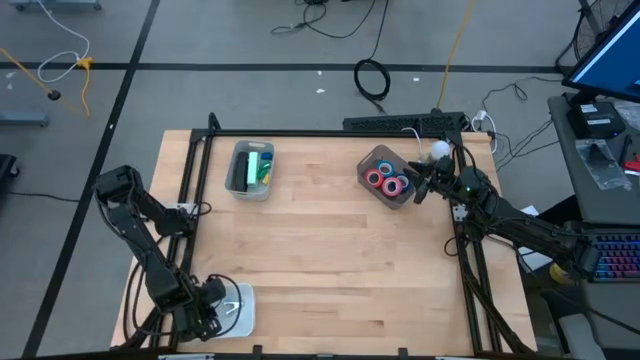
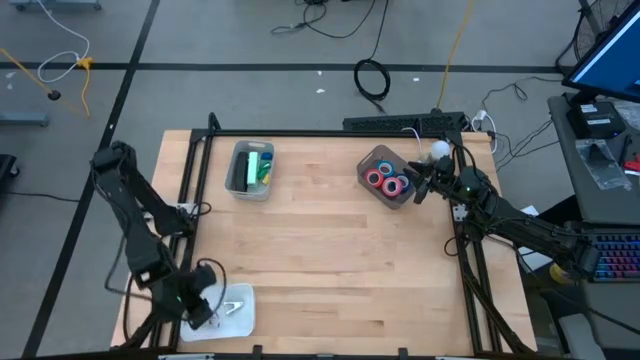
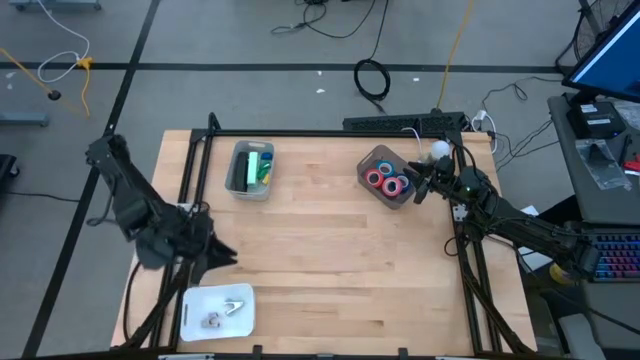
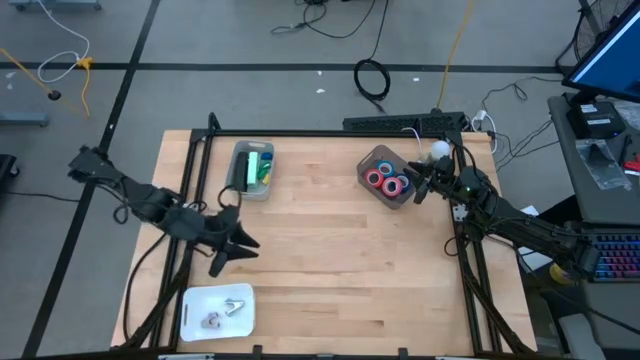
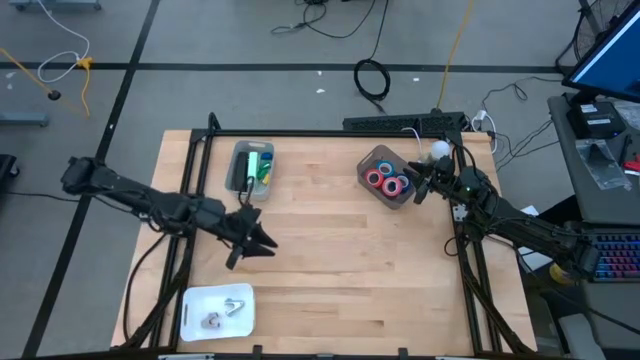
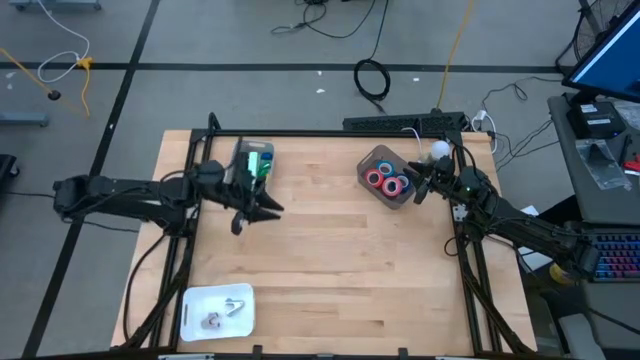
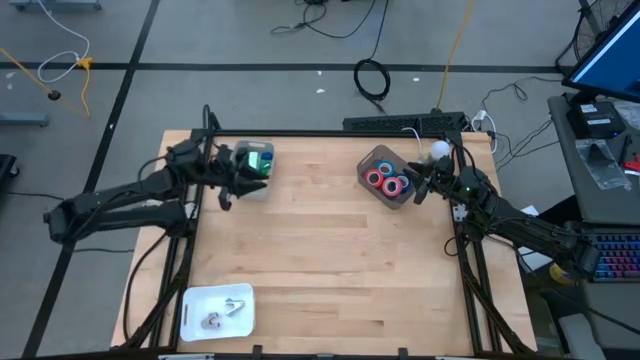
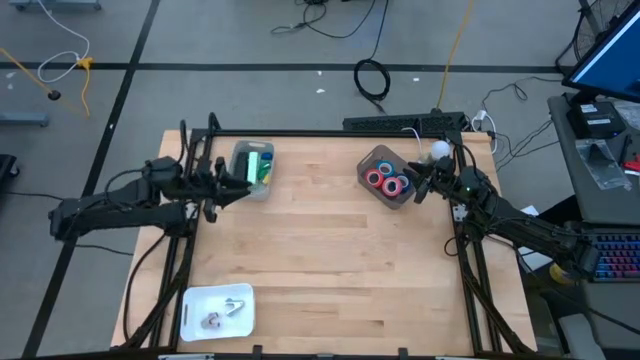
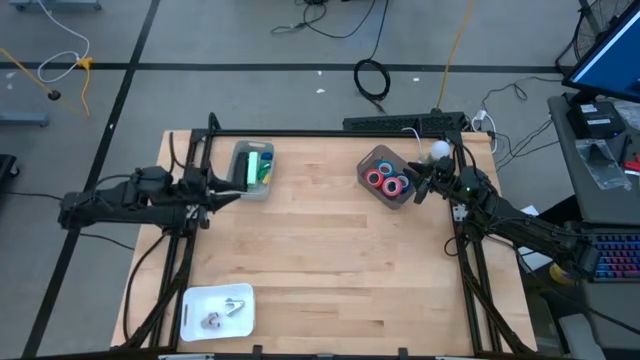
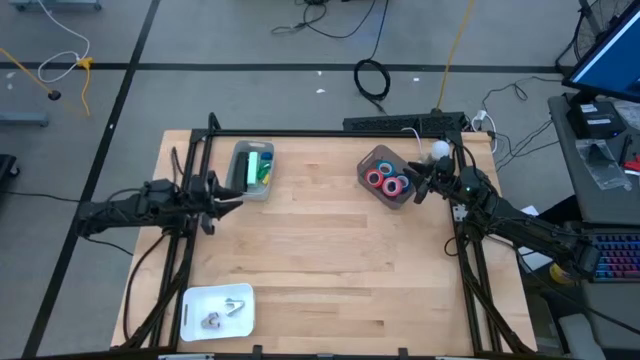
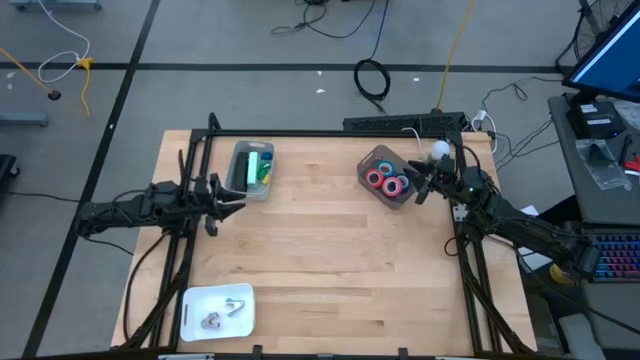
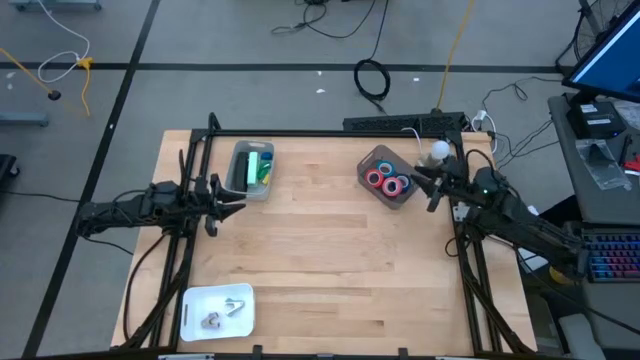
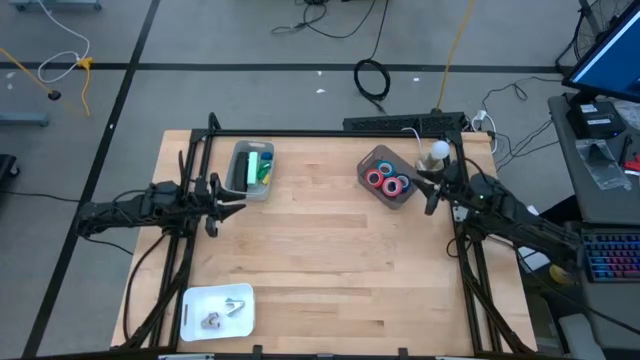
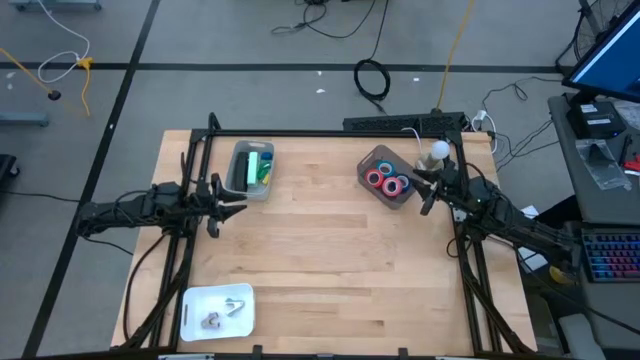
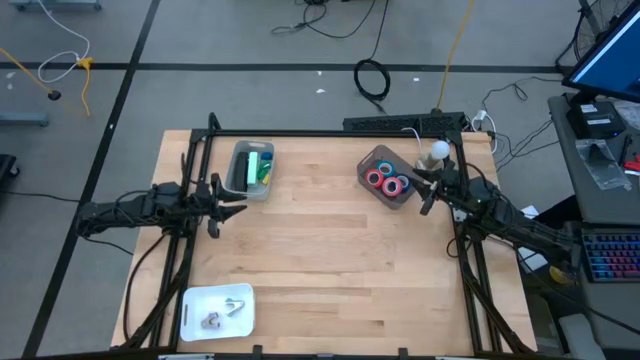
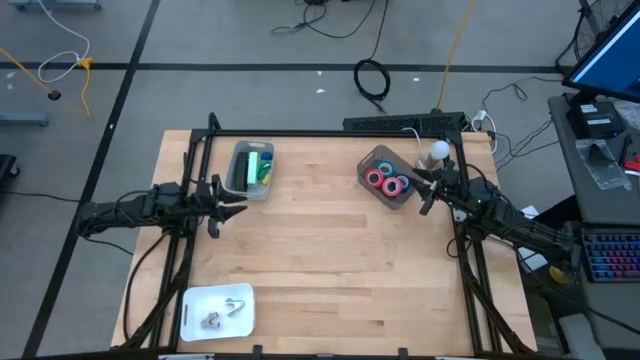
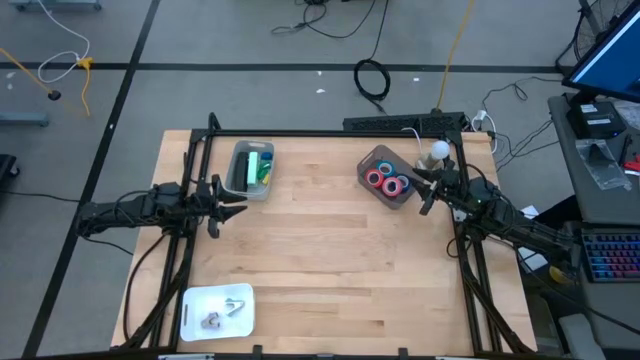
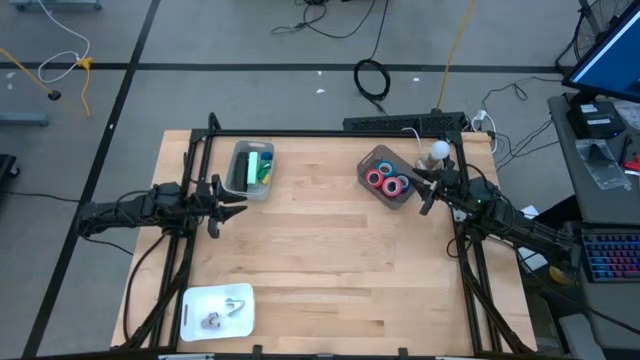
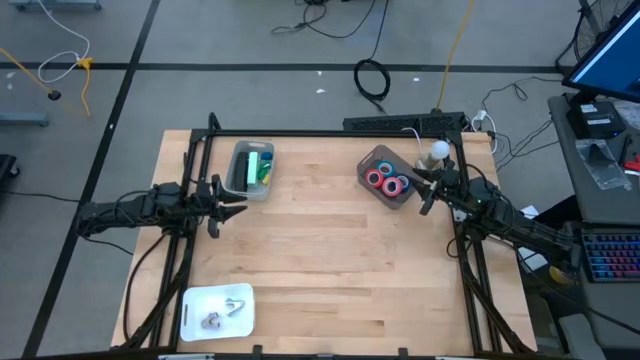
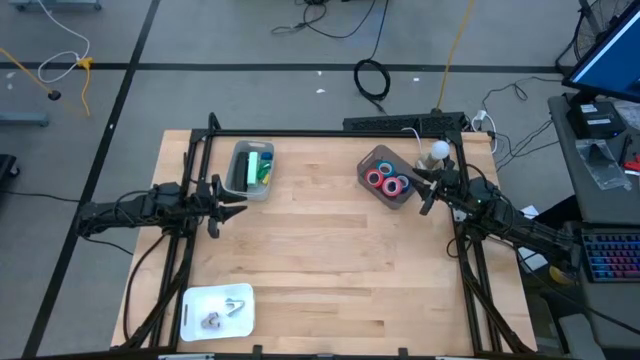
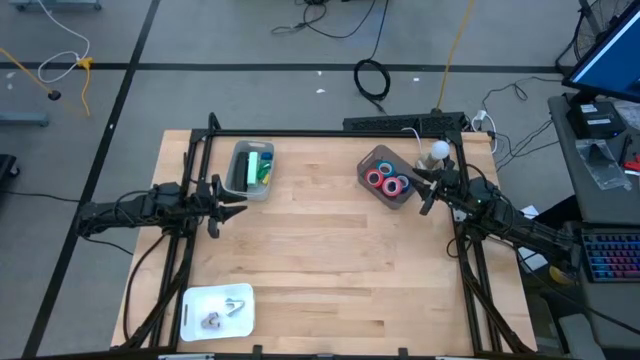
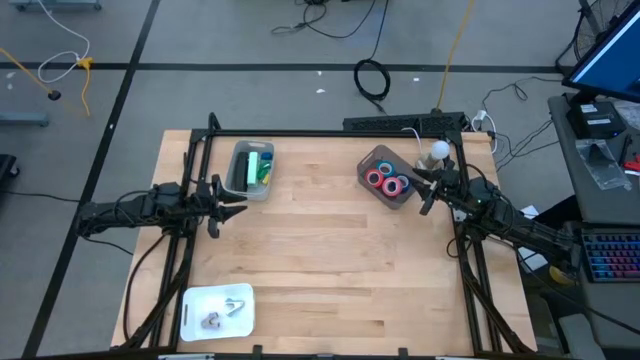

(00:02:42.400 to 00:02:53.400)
Task: Pick and place Stapler, Stapler remover, tape
Return to Home Position

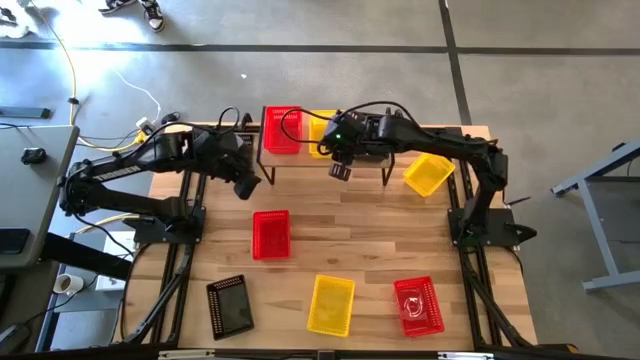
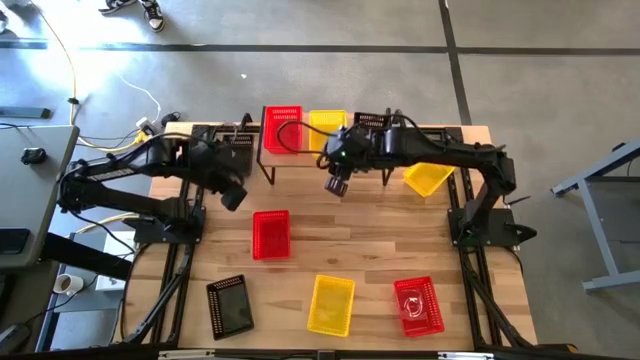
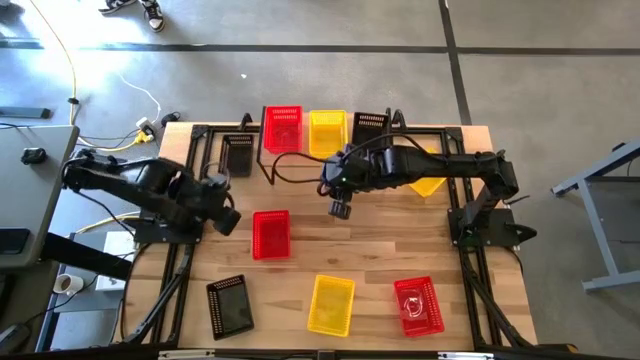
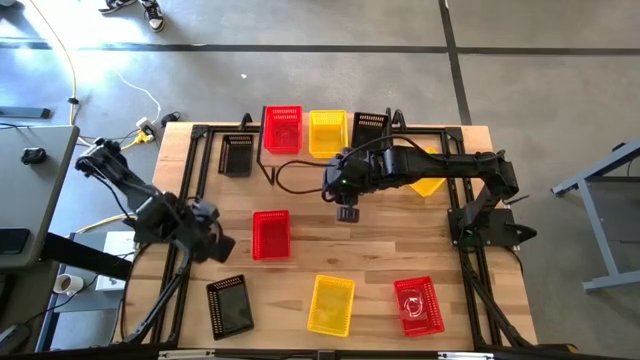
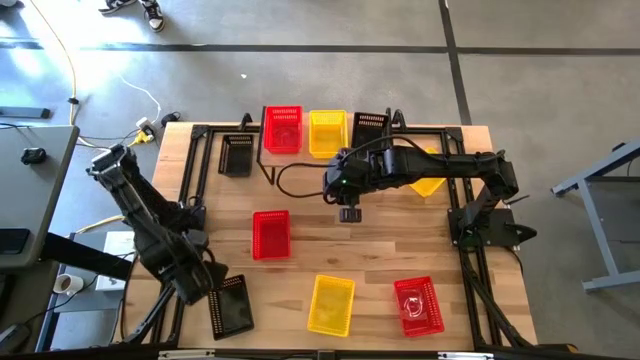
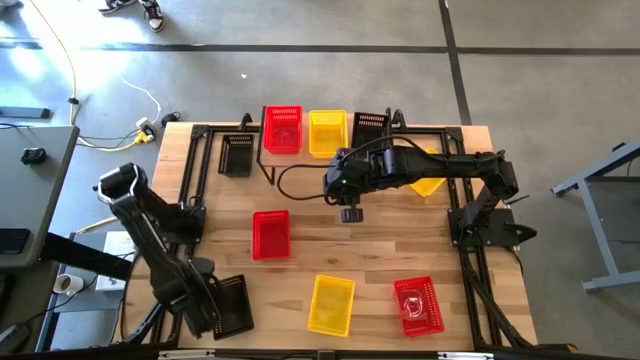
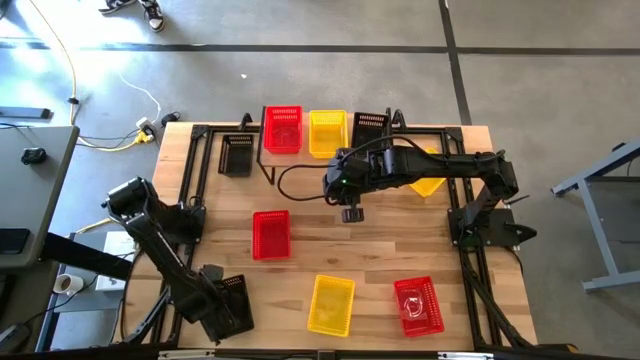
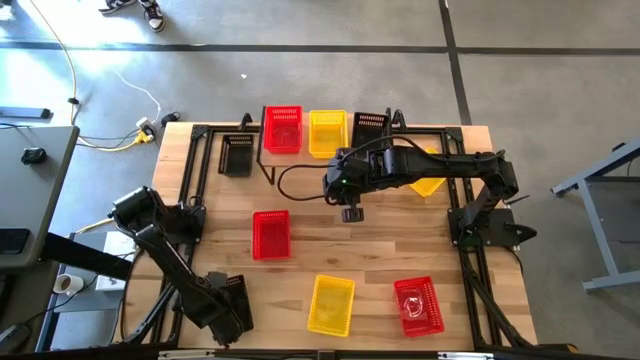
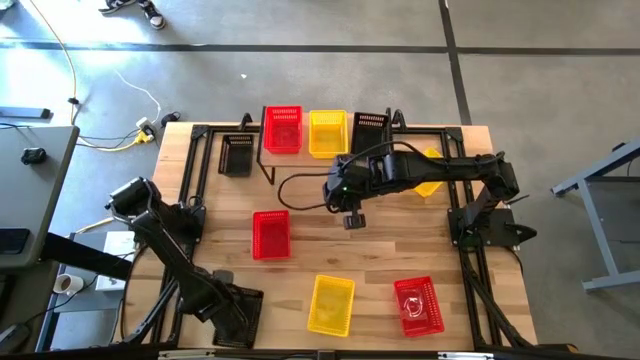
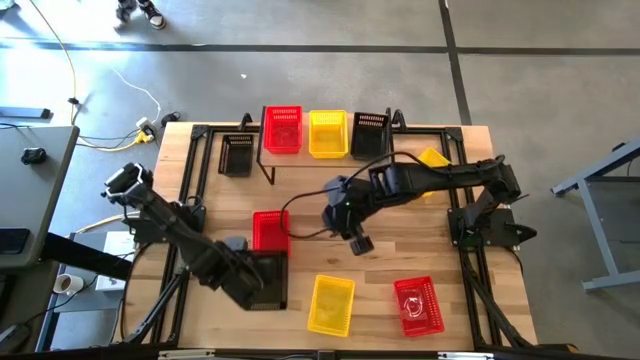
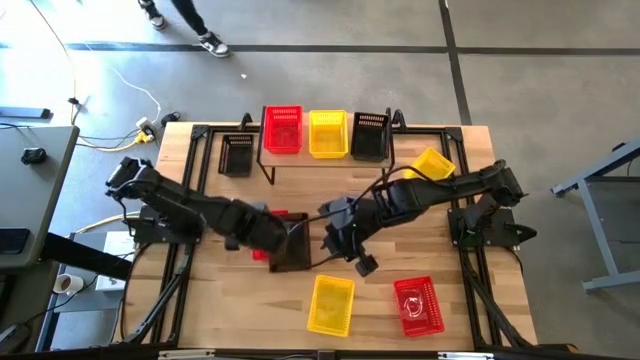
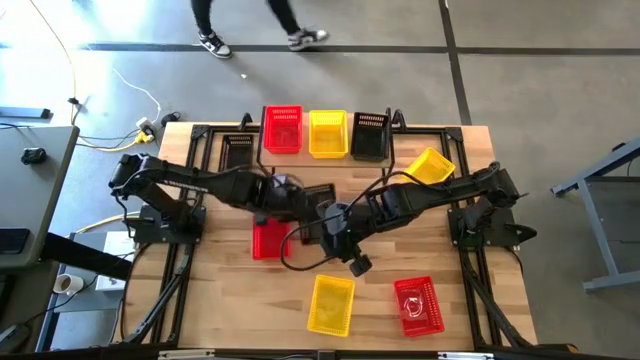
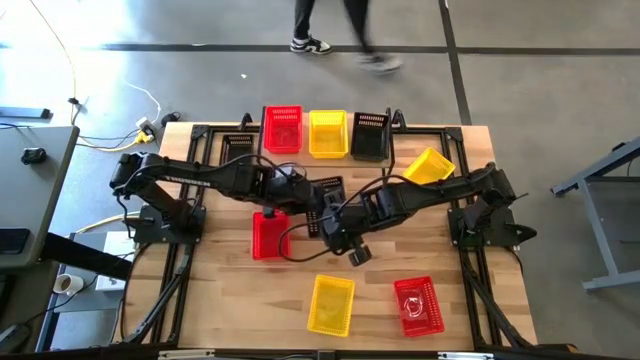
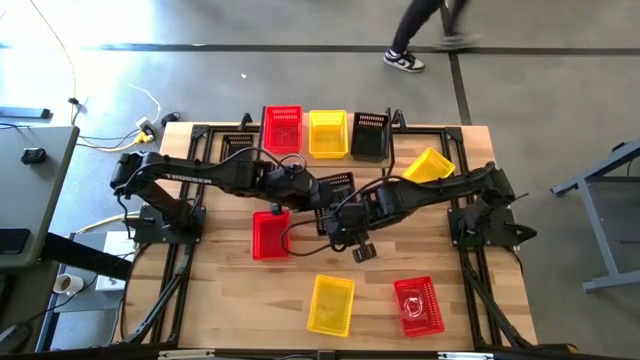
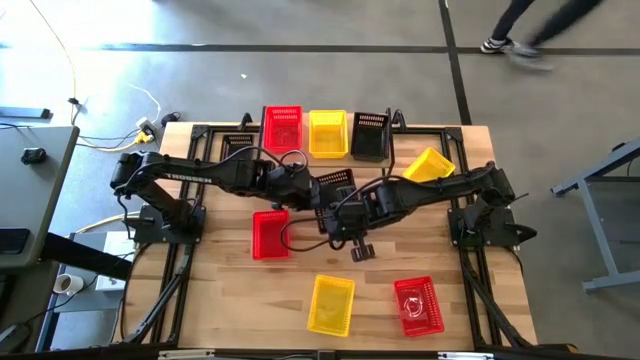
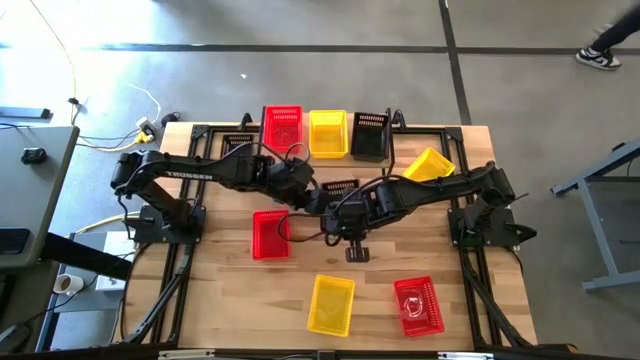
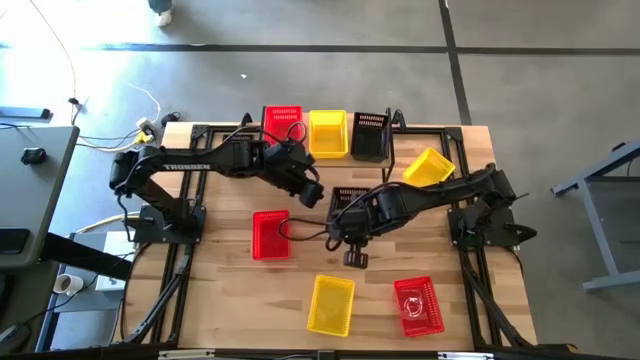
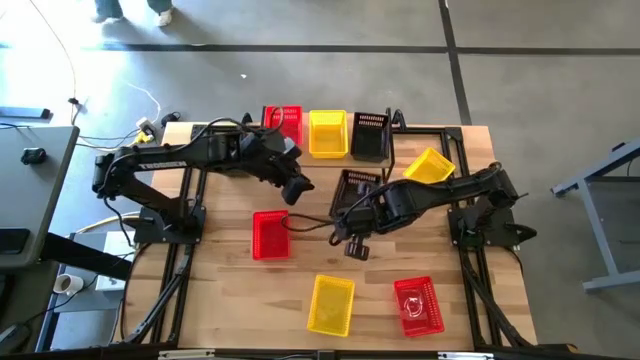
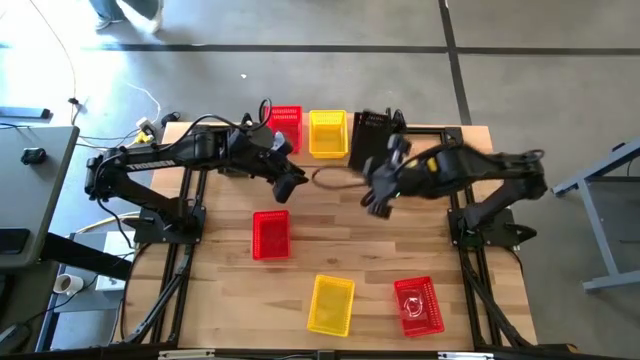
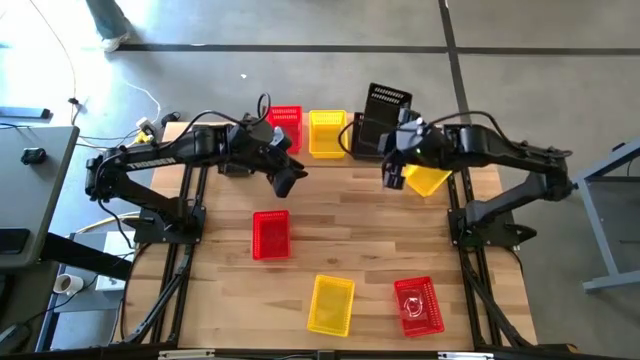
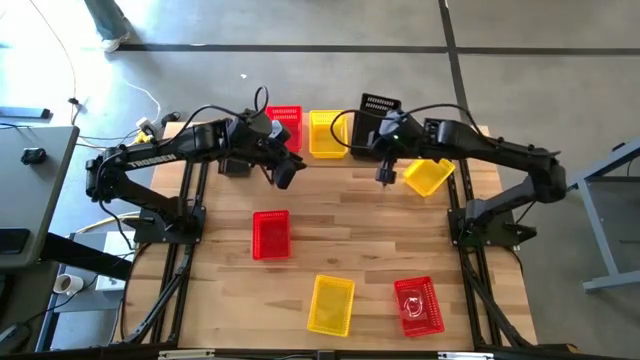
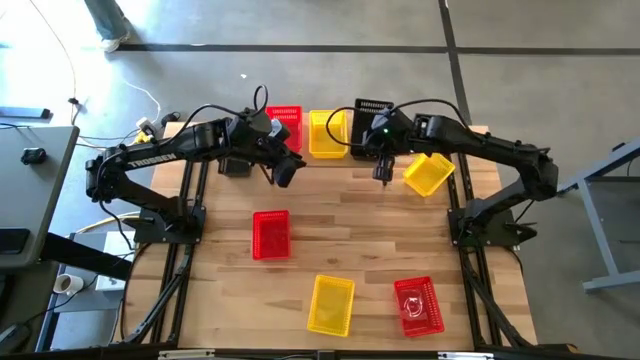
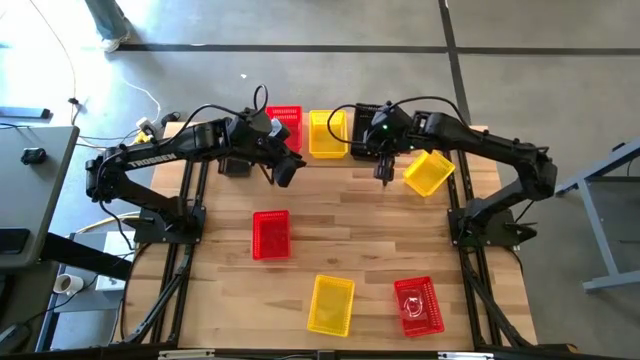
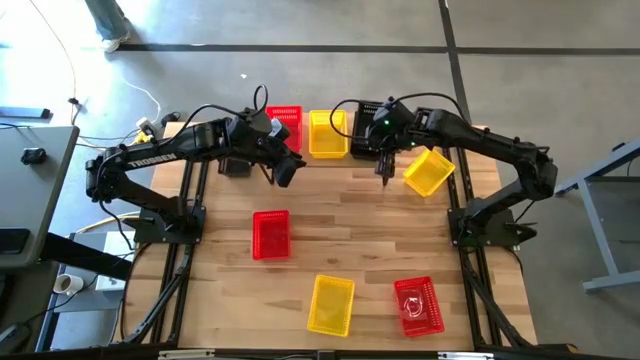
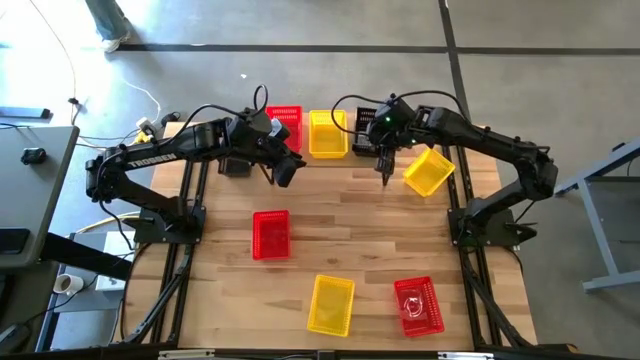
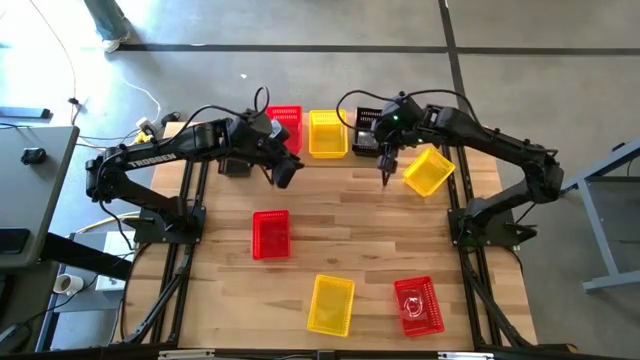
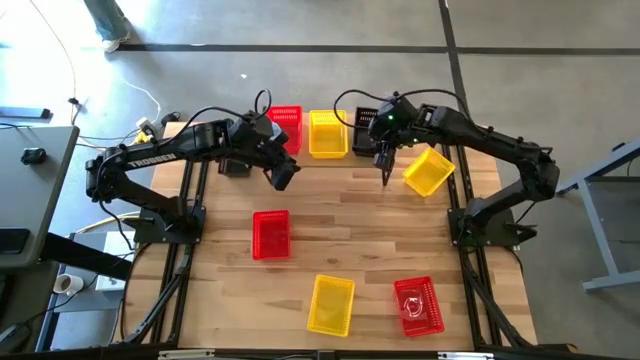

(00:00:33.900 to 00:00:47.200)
Task: Stack baskets on shelf by color
Stack the bottom black bin on top of the other black bin on the shelf
